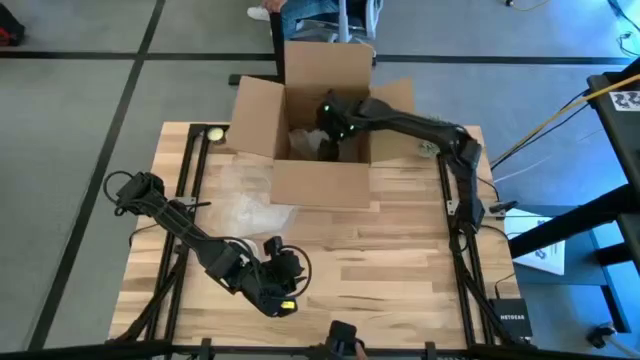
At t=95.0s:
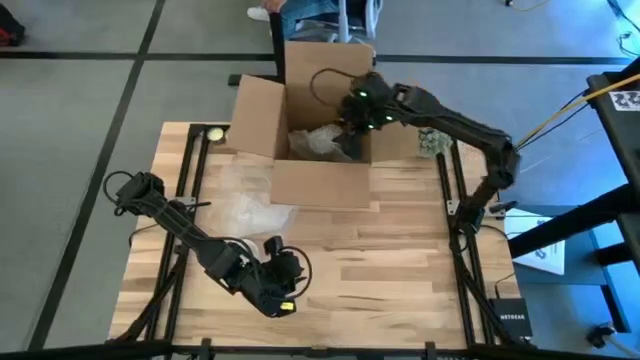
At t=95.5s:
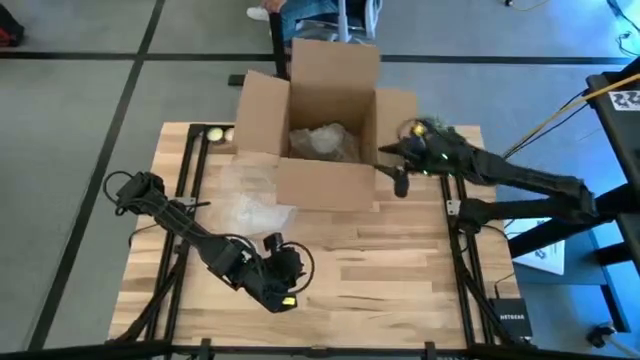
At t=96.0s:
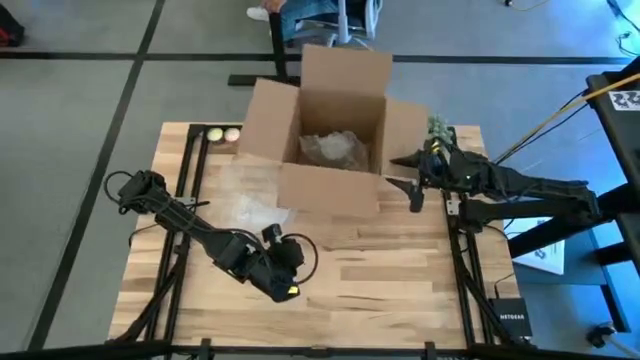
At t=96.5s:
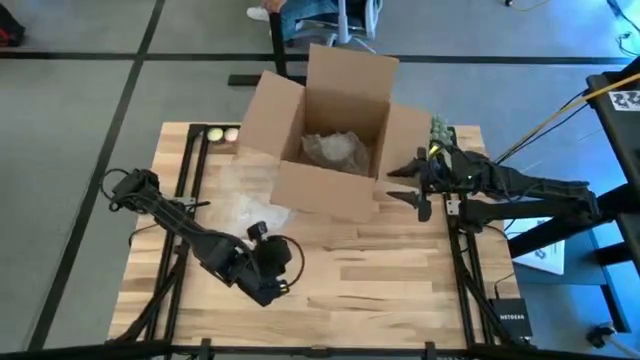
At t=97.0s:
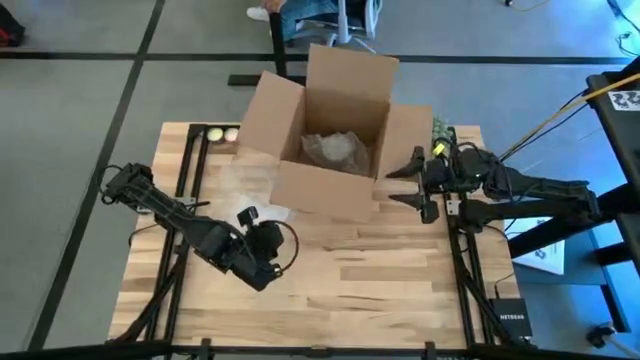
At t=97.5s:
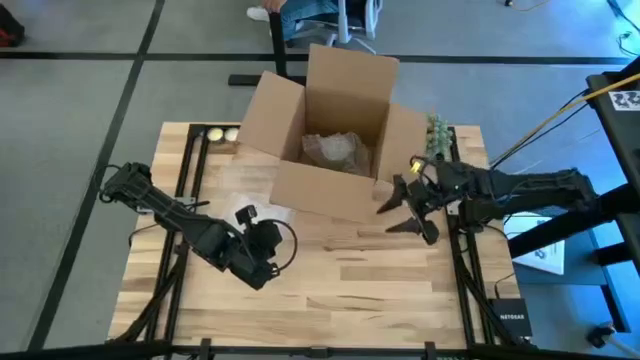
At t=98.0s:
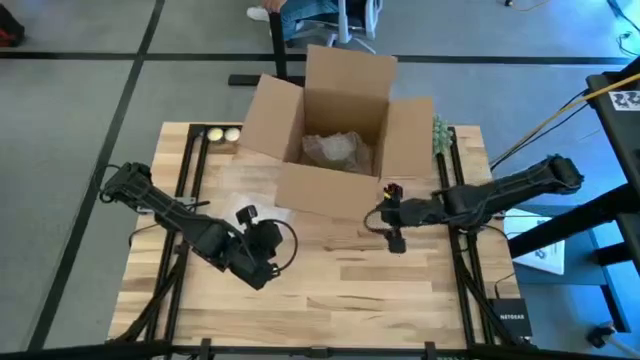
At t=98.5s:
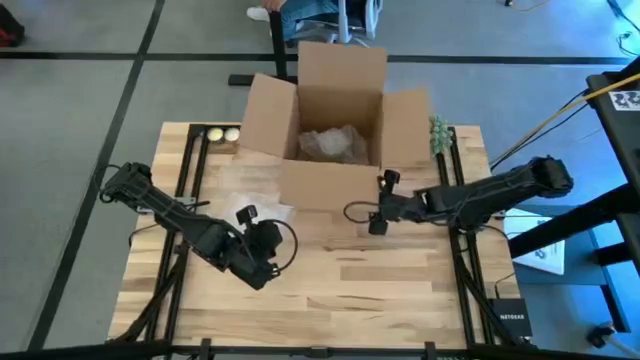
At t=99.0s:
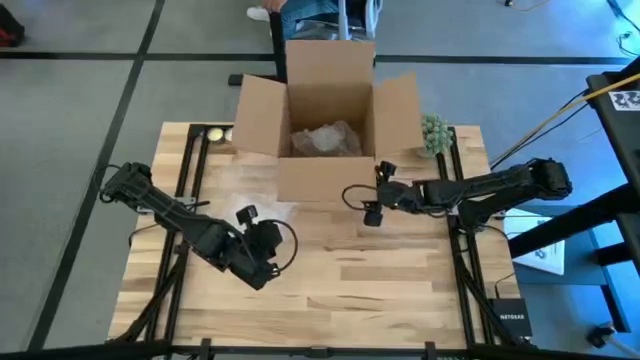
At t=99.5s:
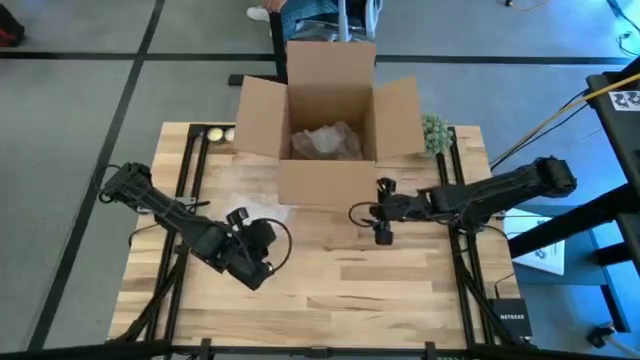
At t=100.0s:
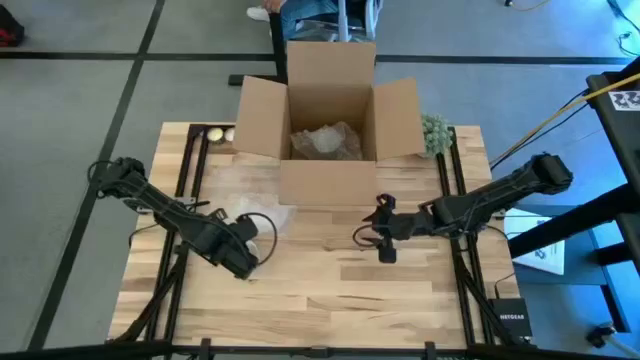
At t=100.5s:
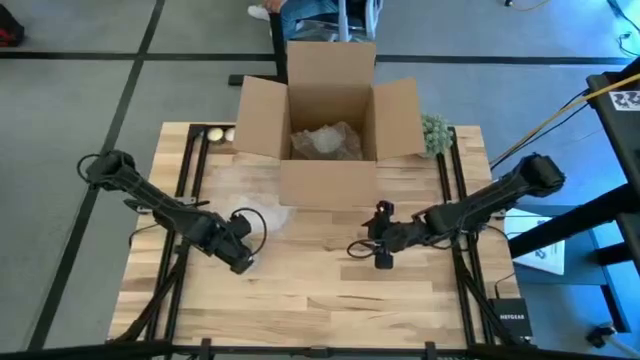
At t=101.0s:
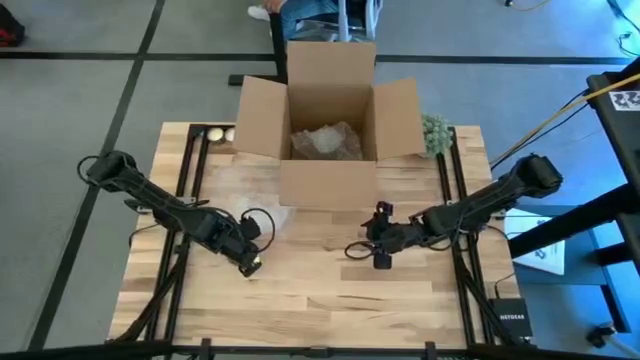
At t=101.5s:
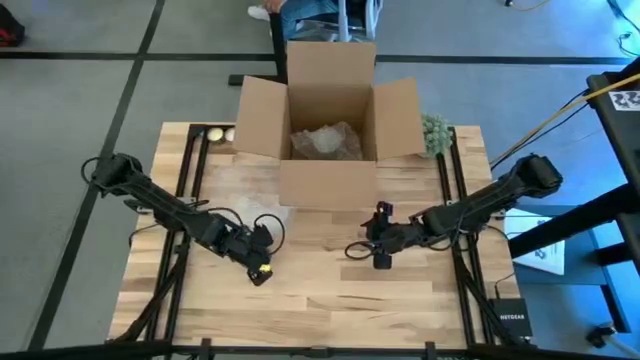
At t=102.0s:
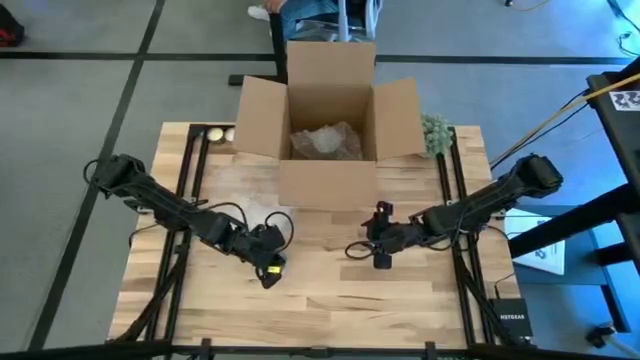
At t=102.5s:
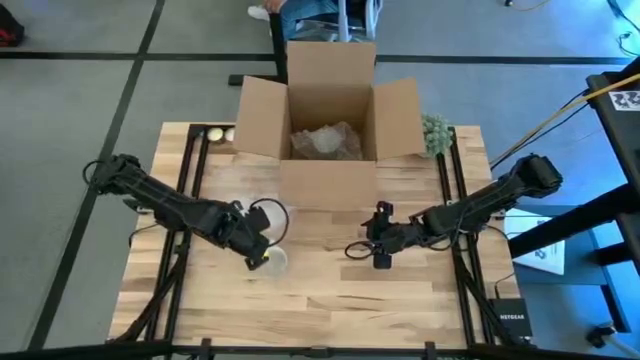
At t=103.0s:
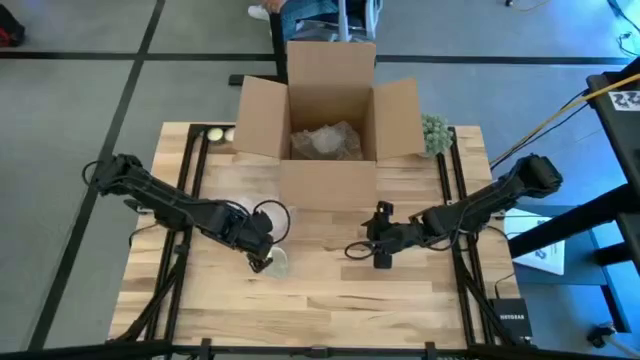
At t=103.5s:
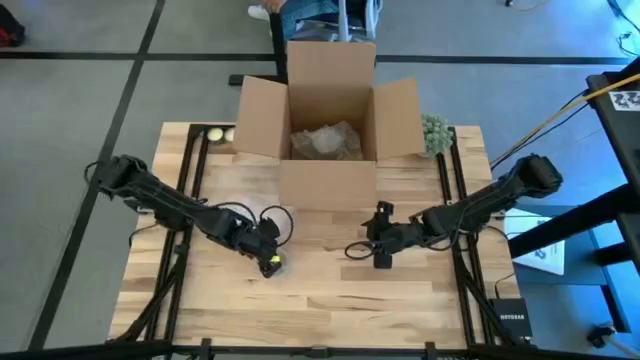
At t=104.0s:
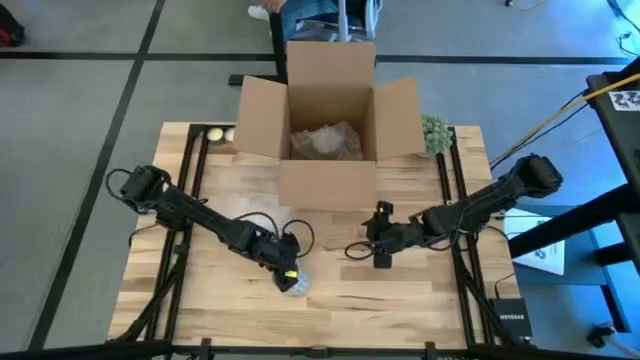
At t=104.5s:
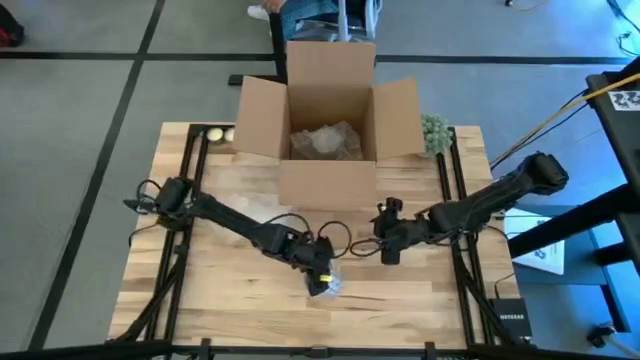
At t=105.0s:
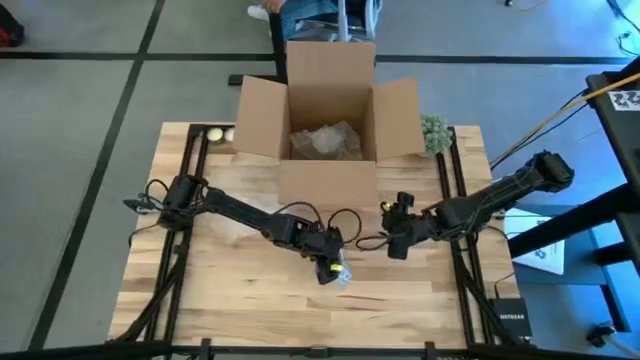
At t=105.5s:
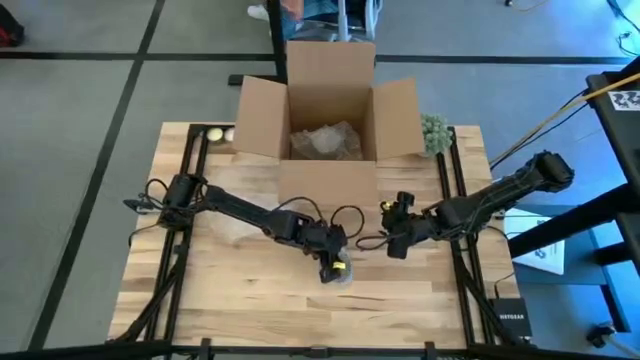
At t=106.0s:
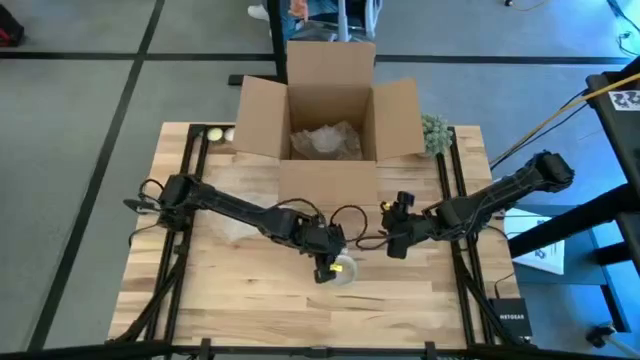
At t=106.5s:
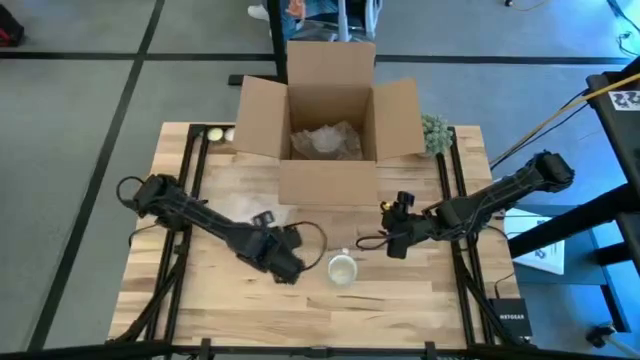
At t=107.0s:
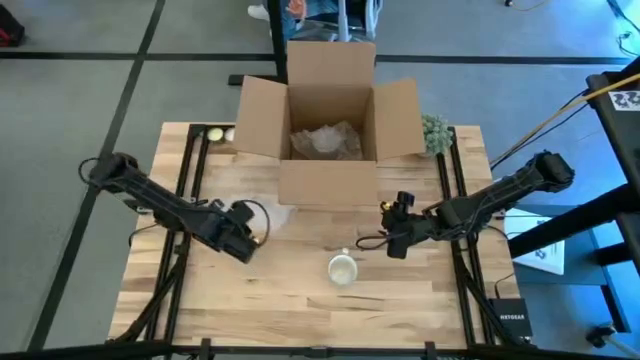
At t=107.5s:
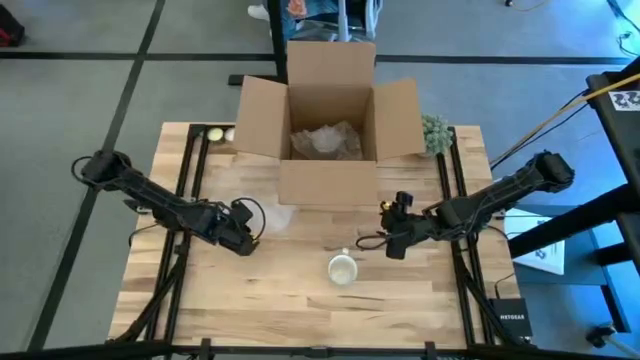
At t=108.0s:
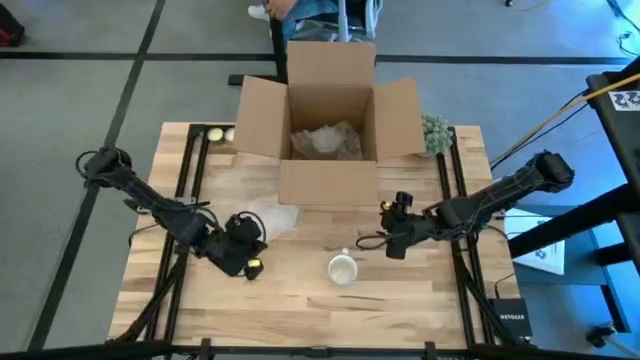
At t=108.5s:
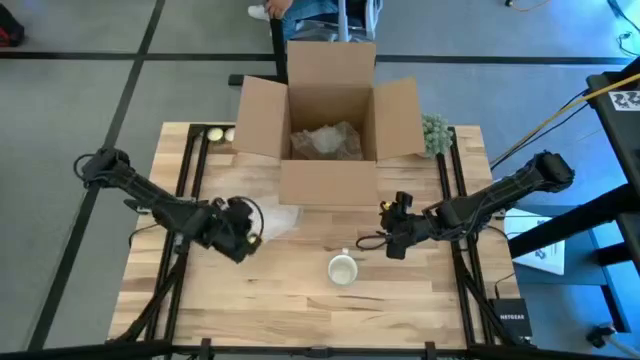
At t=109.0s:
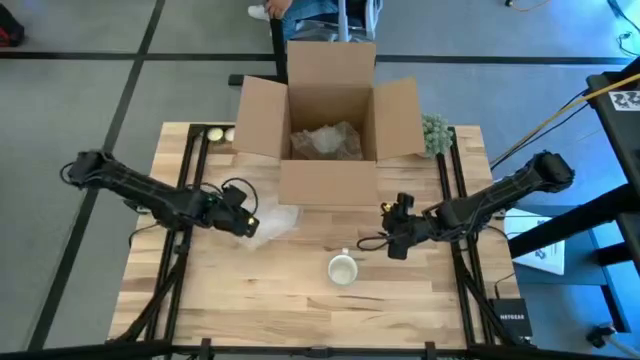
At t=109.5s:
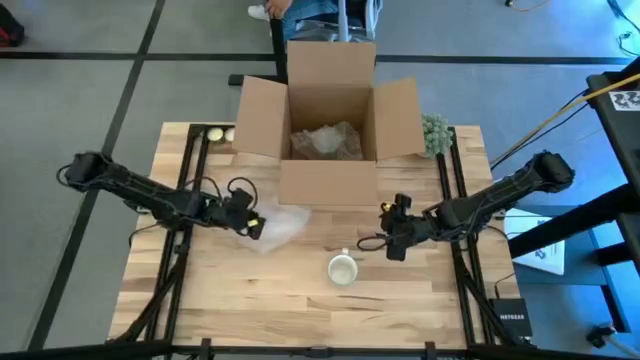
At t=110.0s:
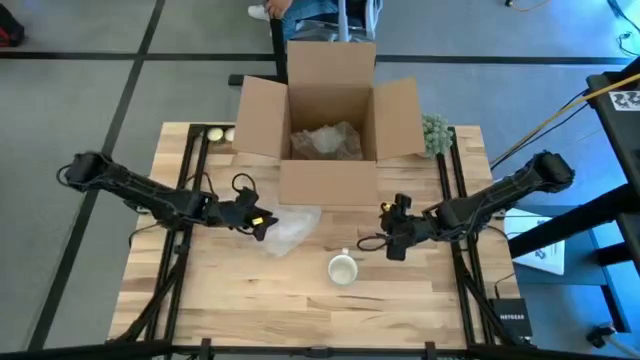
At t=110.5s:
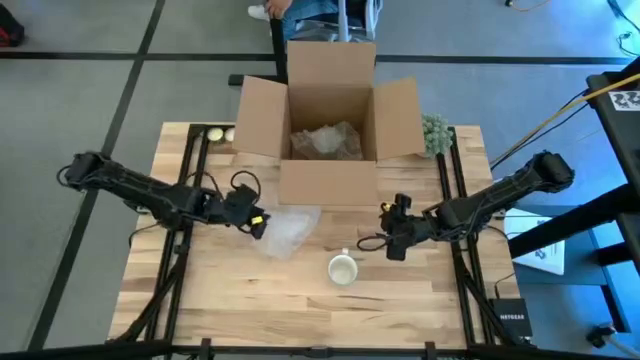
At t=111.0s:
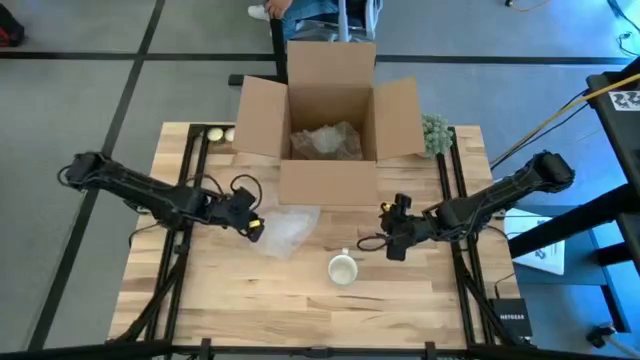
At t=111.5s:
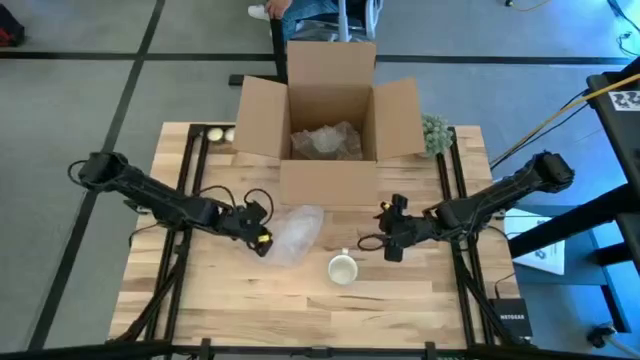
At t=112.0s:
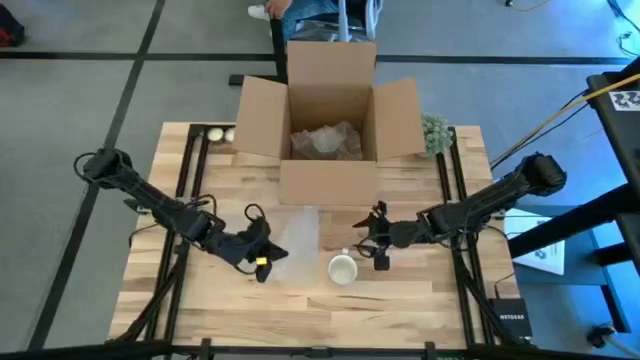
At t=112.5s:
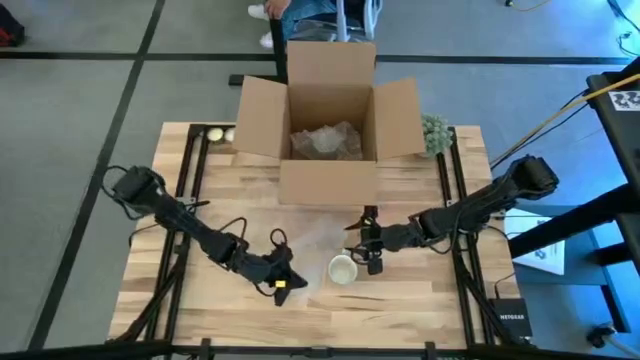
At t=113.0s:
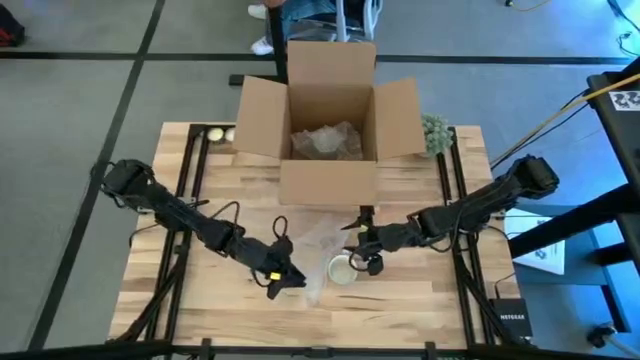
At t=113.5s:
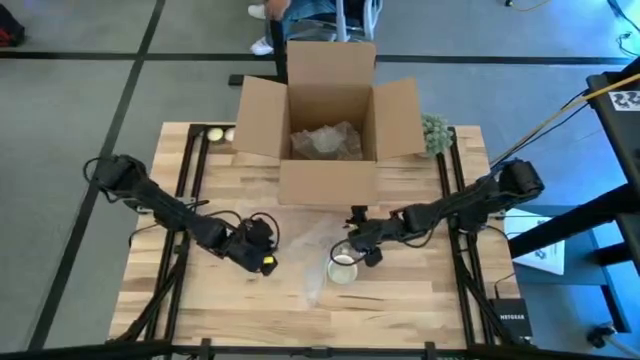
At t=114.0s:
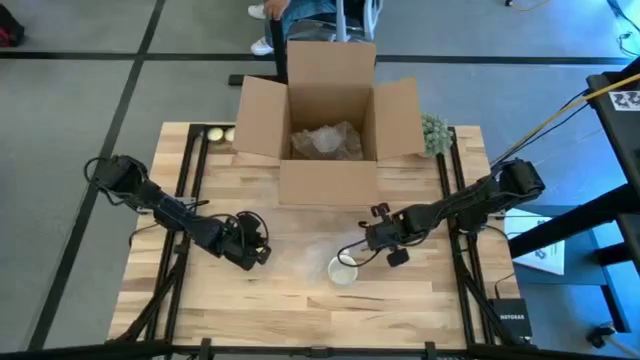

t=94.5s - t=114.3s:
Task: wrap mug
Wrap the mug with the bubble wrap
